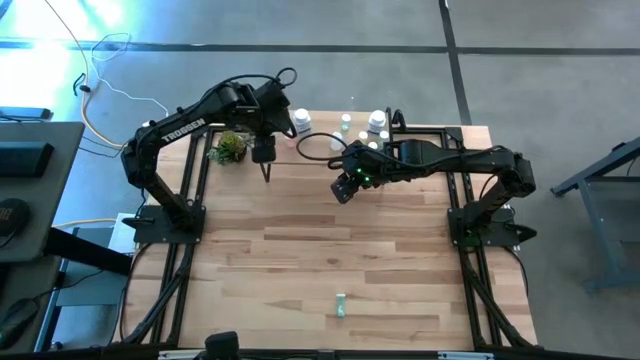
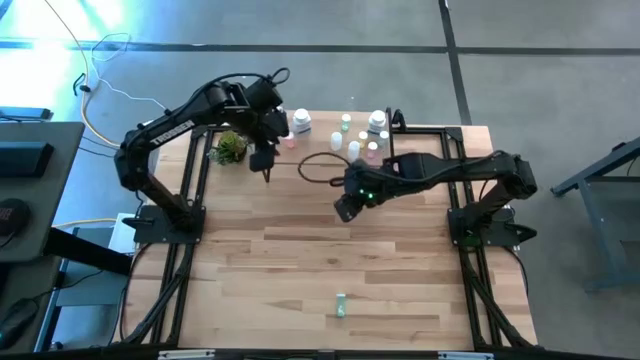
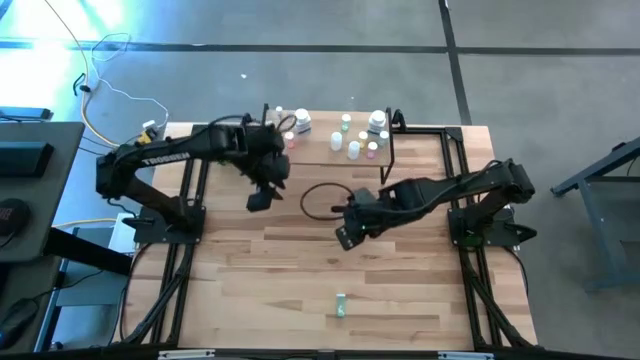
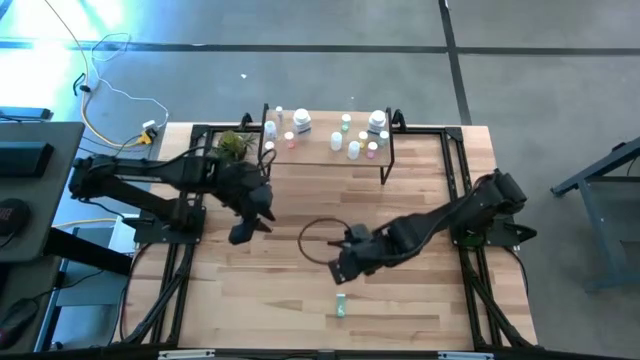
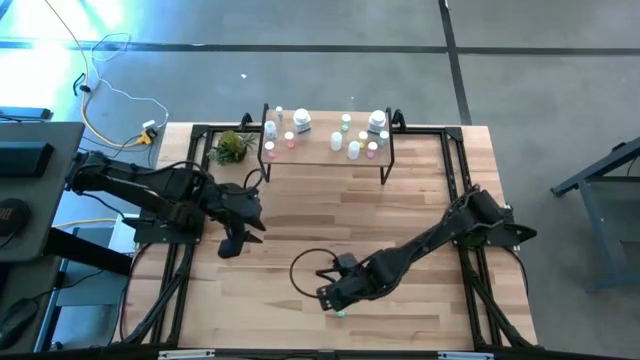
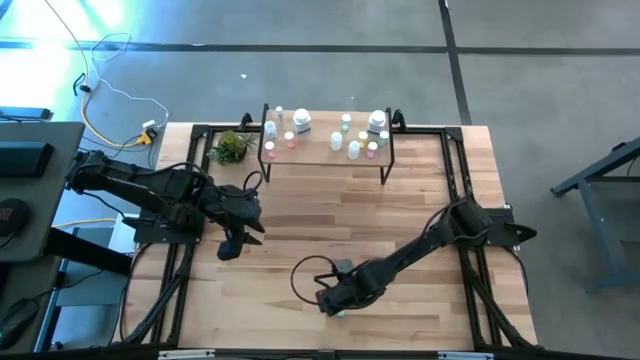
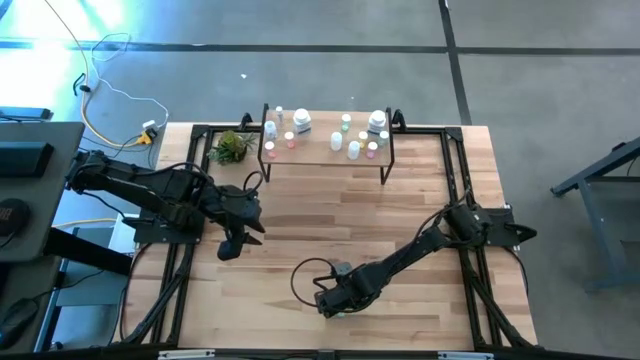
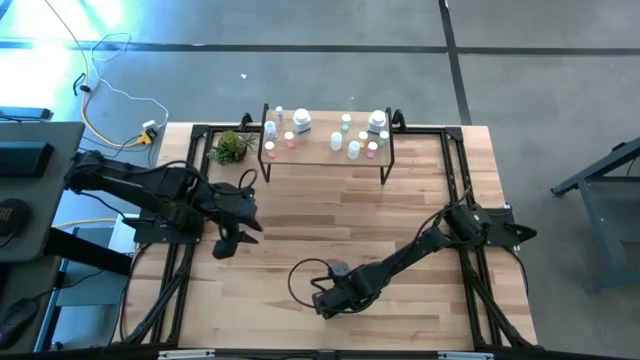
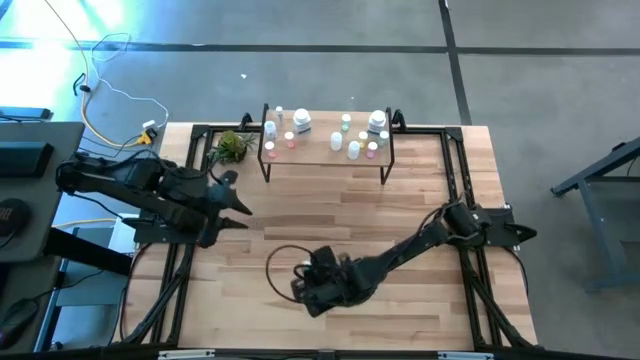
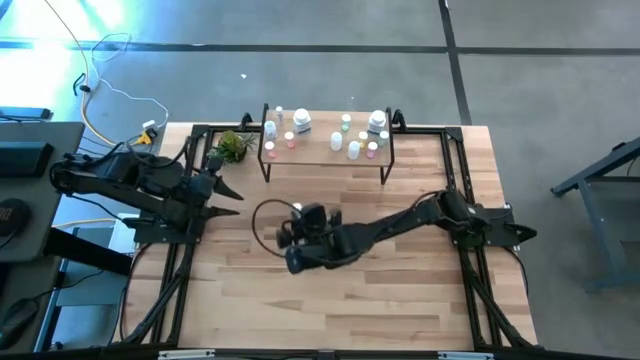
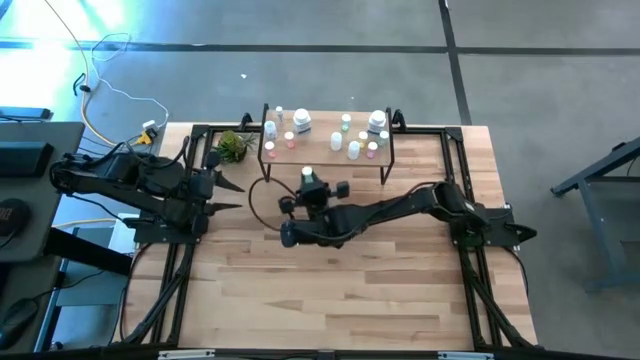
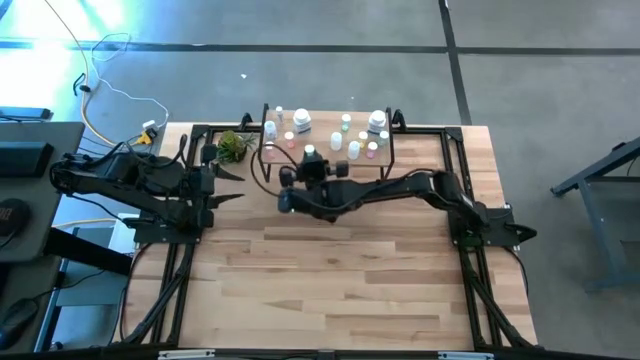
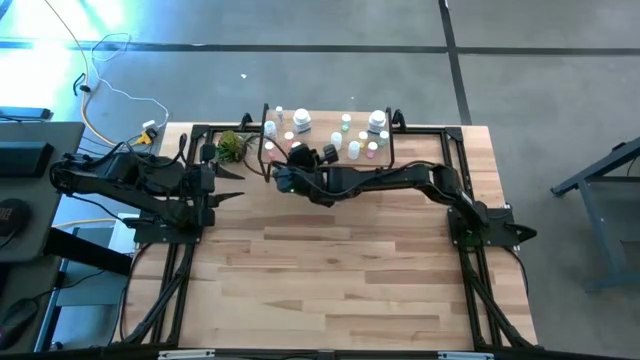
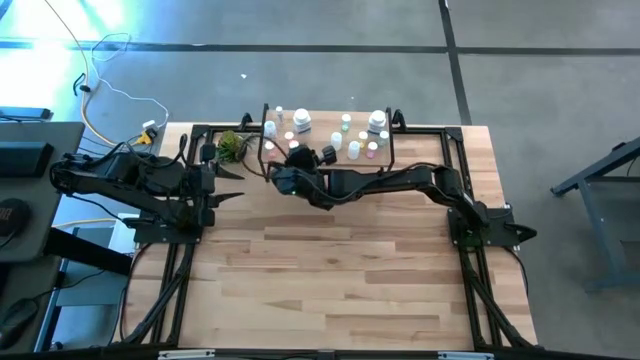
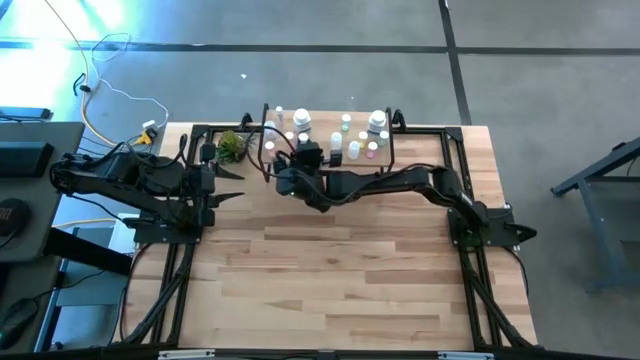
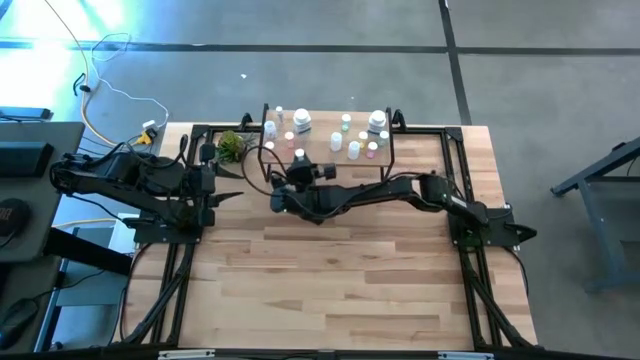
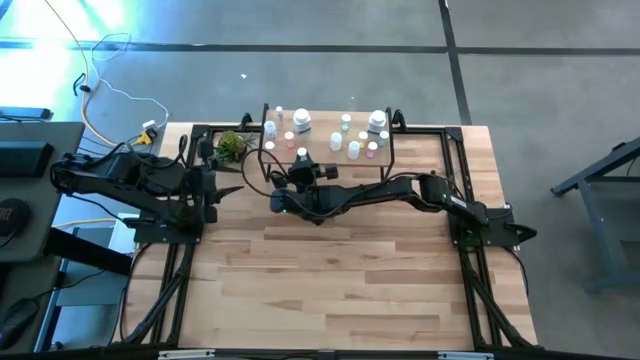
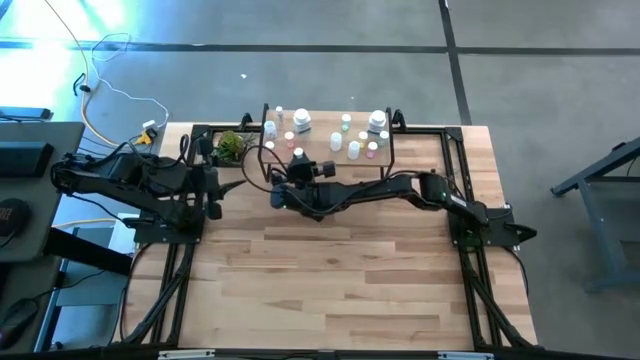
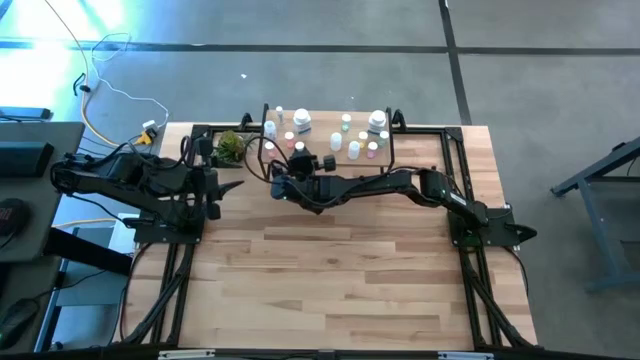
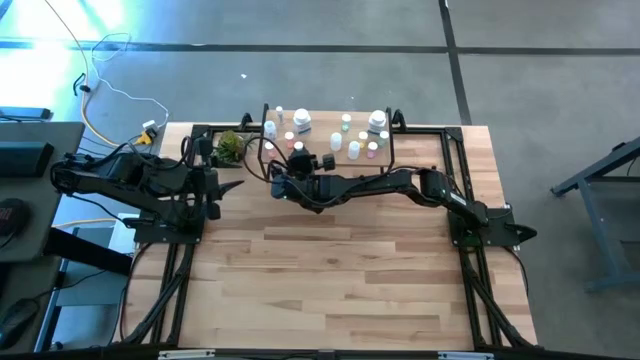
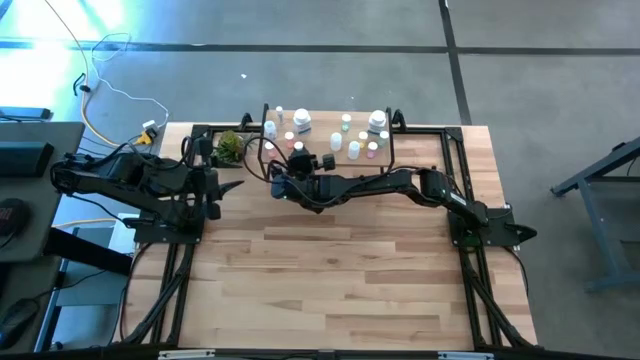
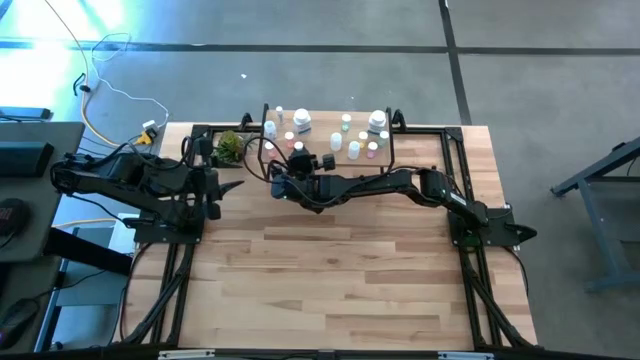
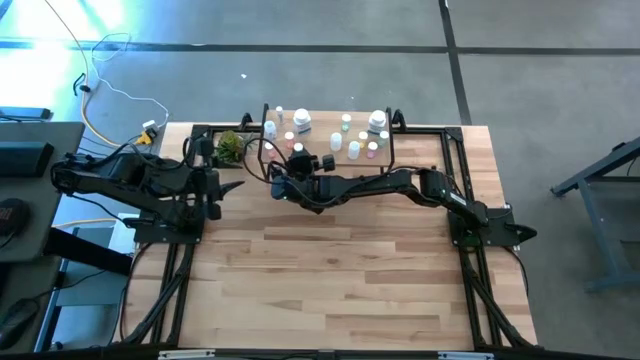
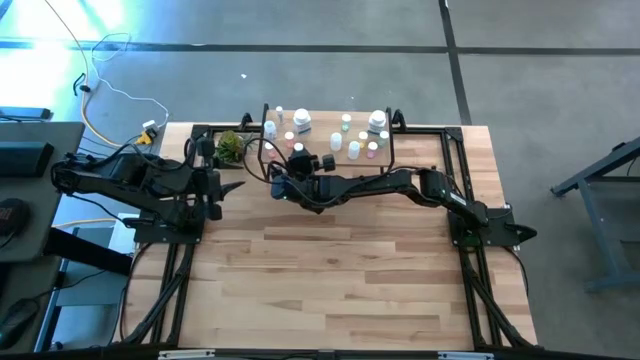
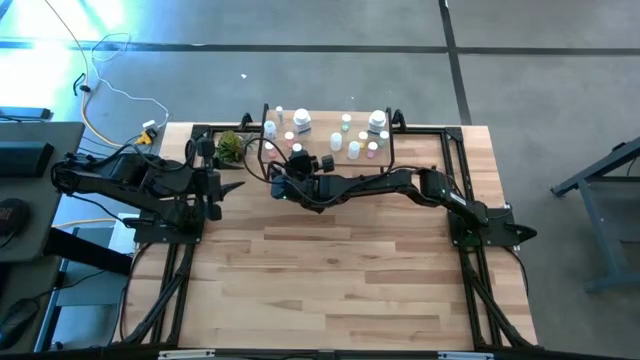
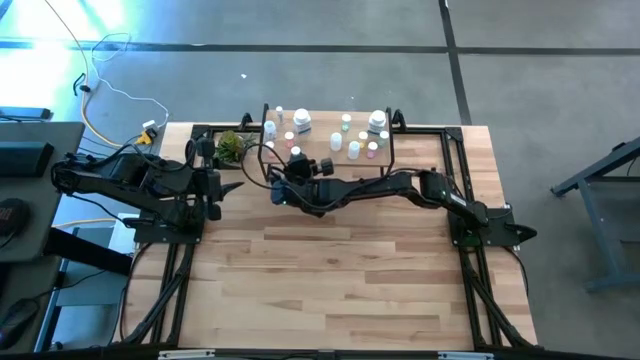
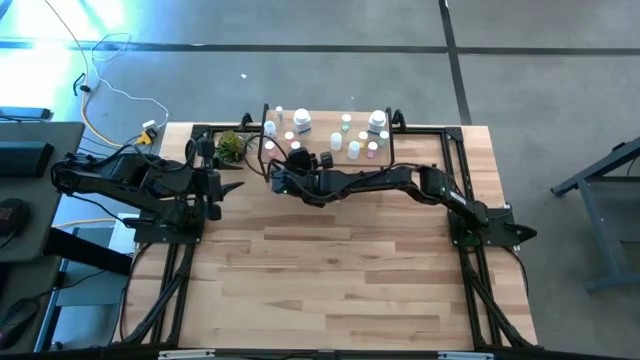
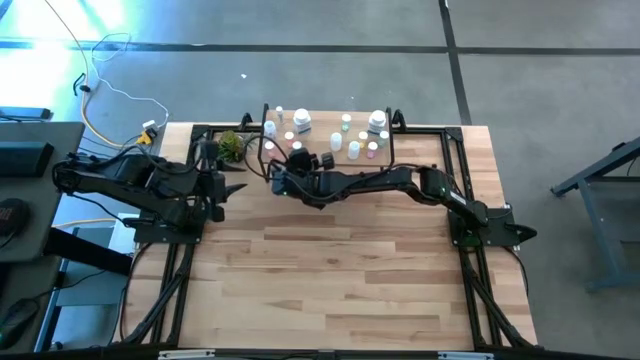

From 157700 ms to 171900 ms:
Task: Pick and place medicine bottles onto shelf by color
Put the blue pill bottle on the shelf

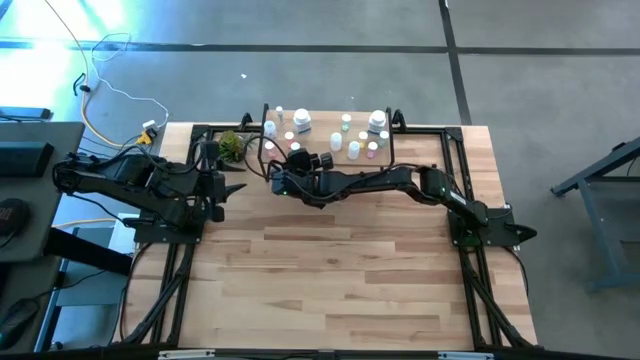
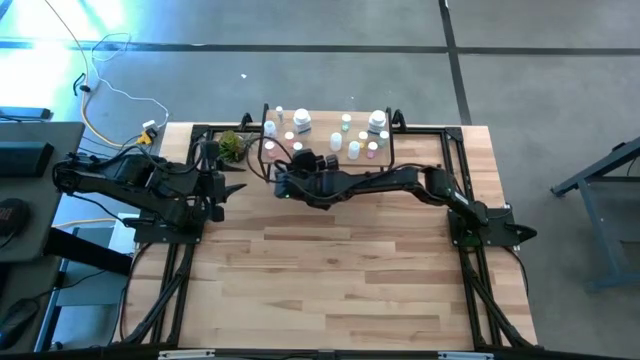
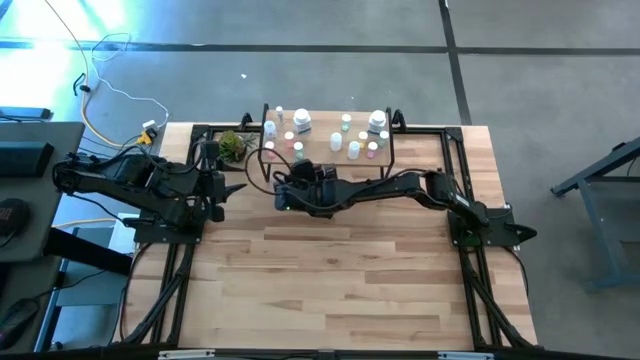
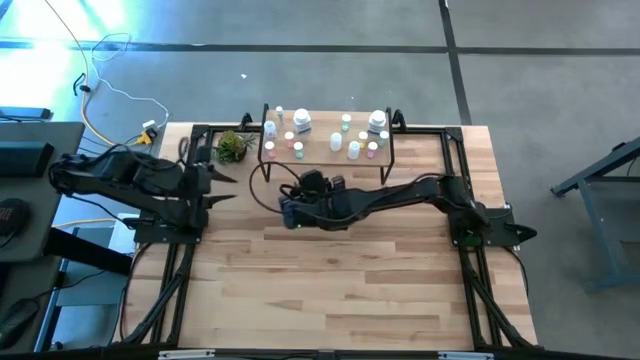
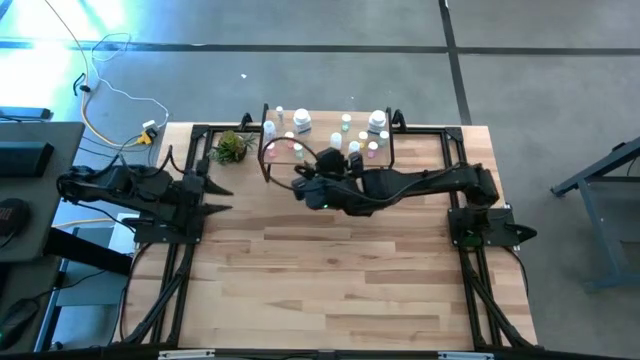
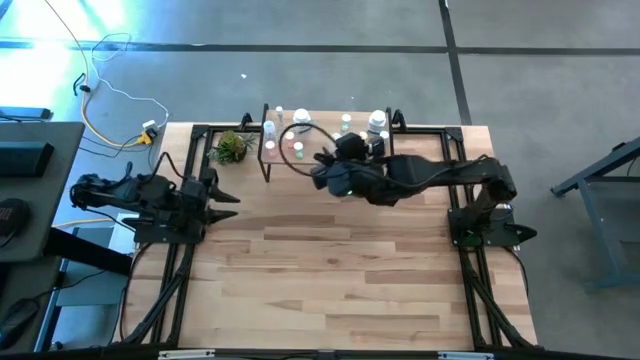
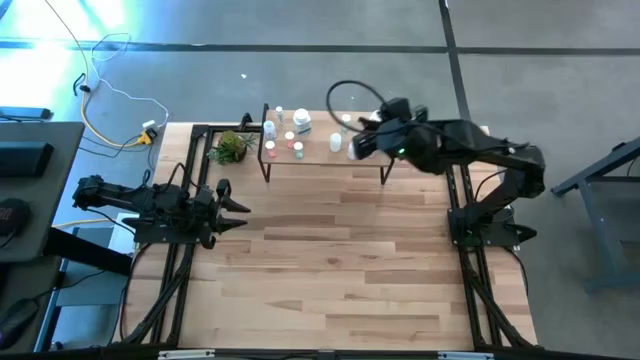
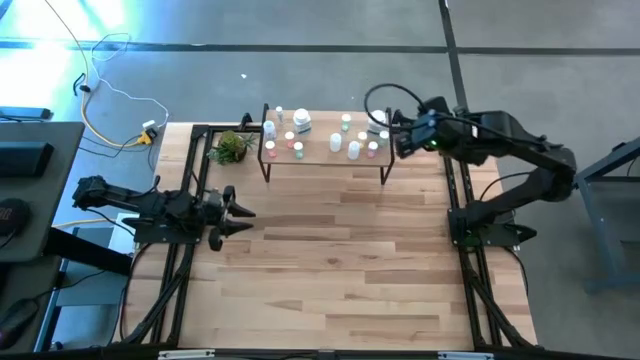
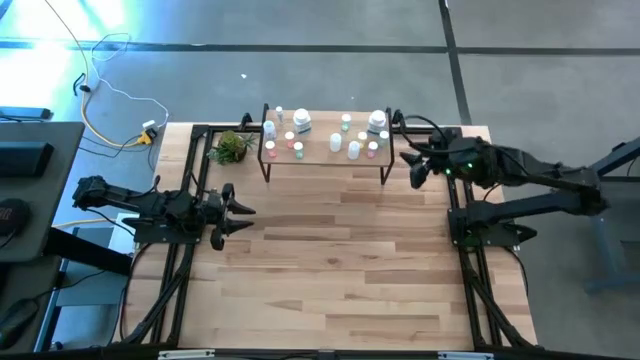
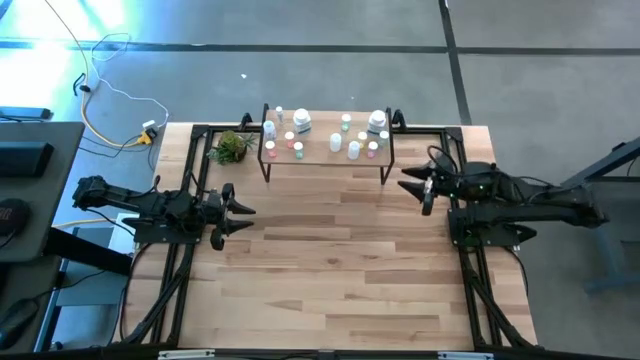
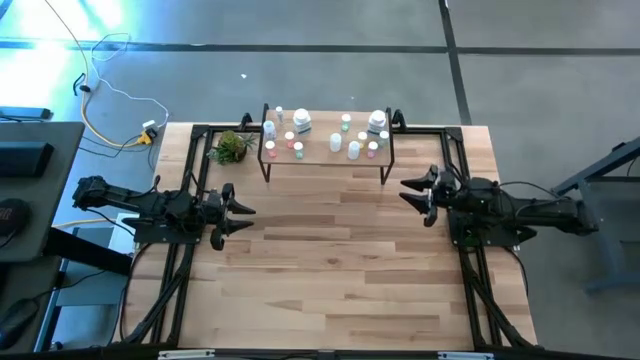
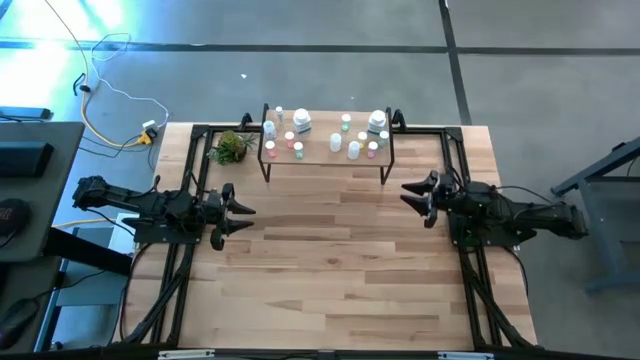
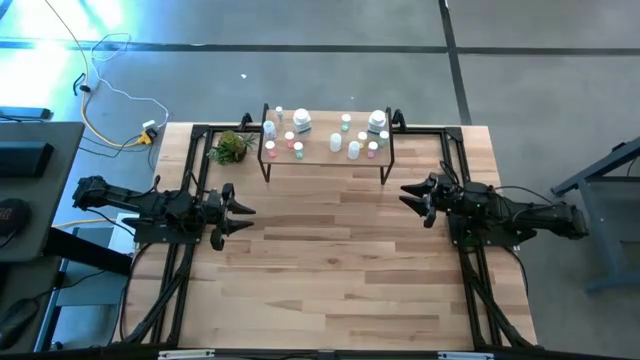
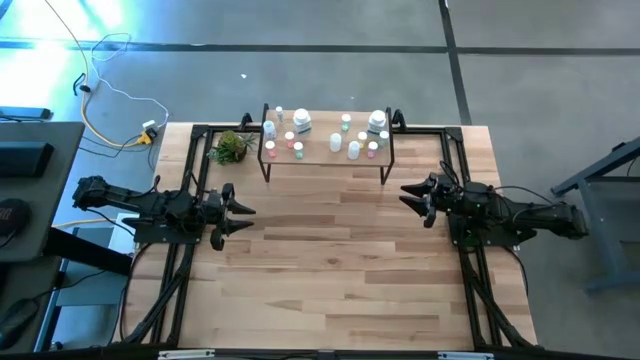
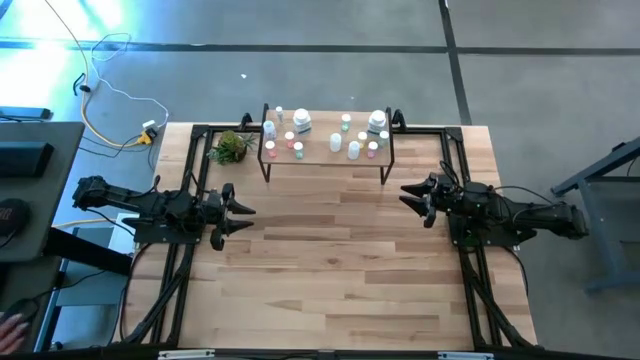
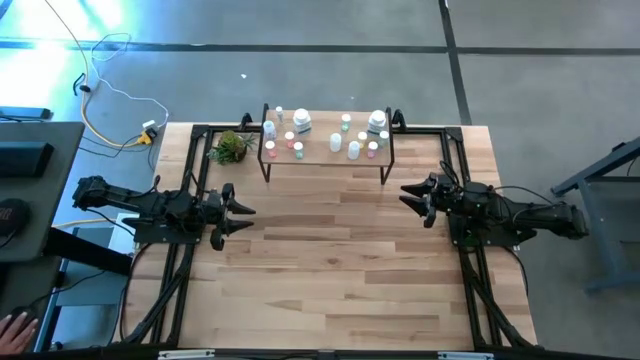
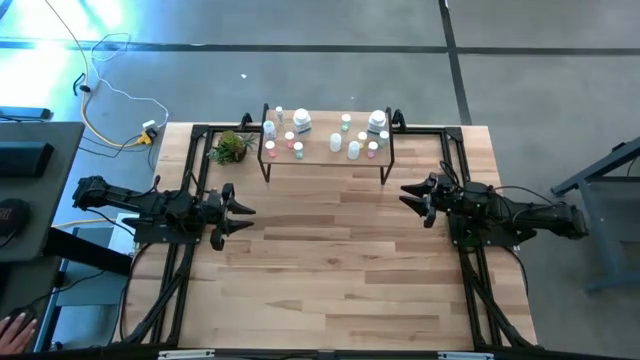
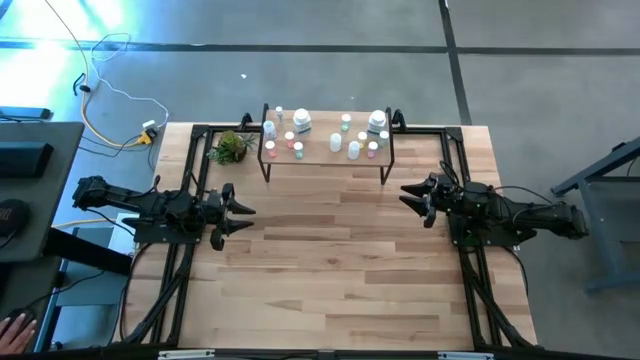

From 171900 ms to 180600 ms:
Return to Home Position
